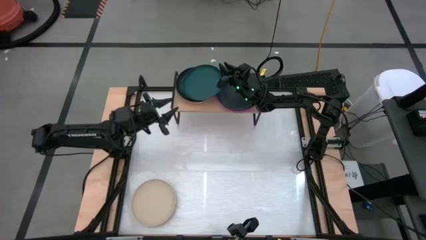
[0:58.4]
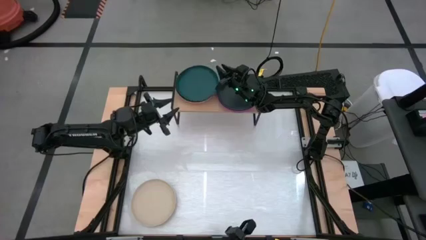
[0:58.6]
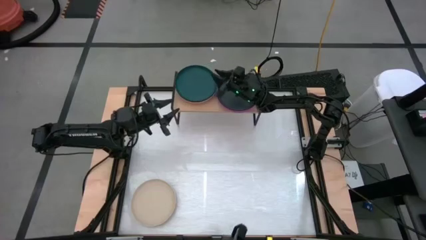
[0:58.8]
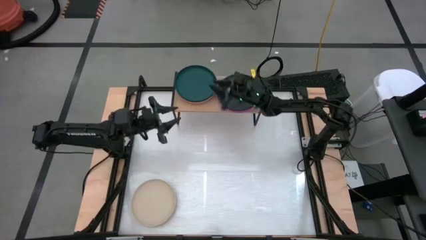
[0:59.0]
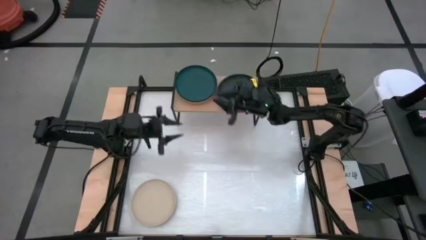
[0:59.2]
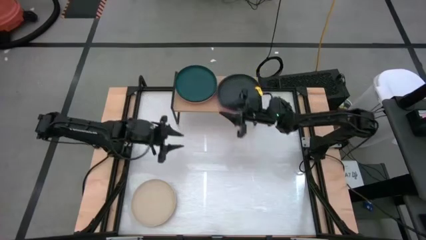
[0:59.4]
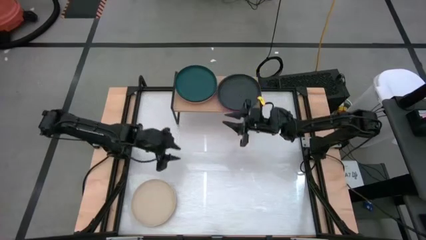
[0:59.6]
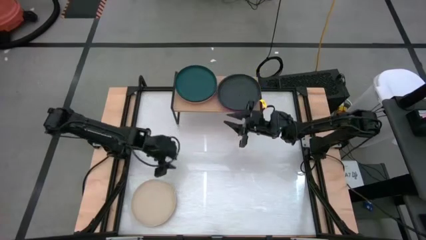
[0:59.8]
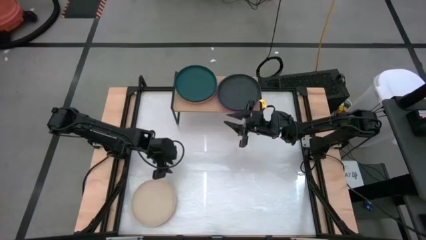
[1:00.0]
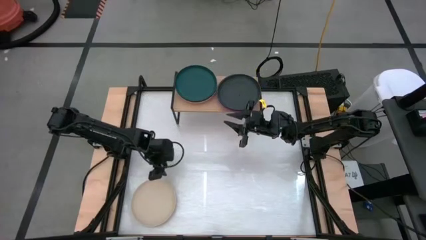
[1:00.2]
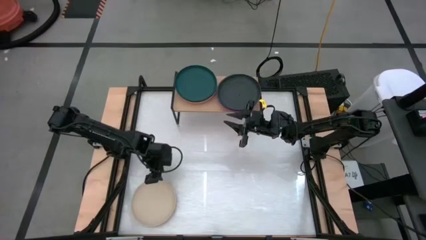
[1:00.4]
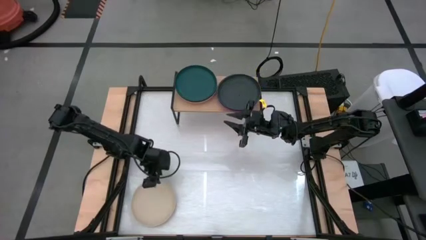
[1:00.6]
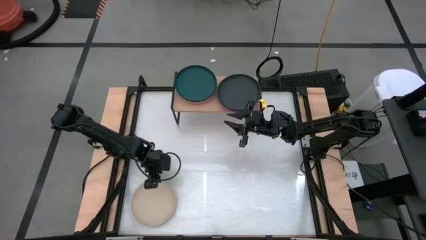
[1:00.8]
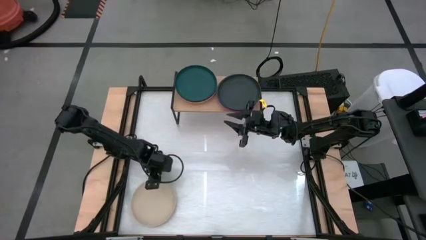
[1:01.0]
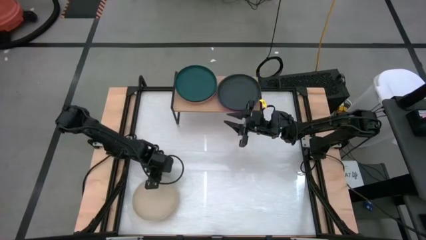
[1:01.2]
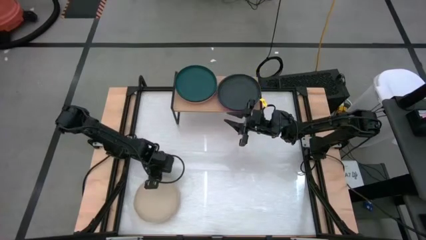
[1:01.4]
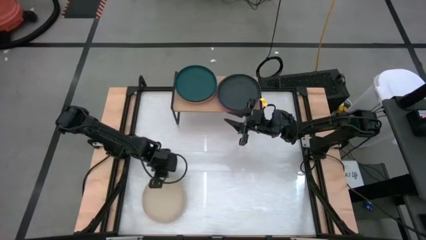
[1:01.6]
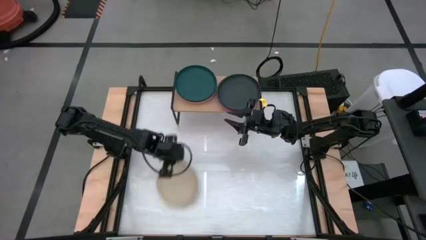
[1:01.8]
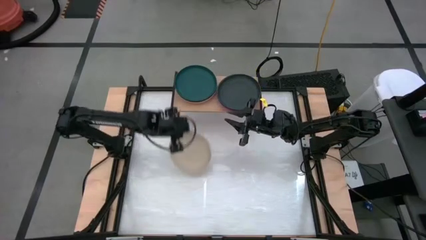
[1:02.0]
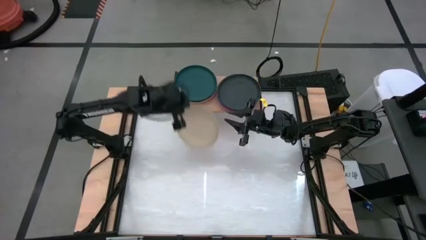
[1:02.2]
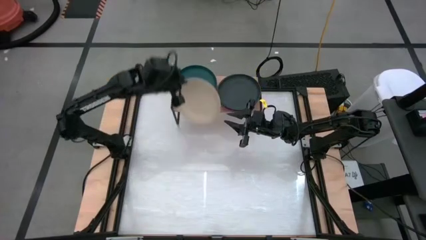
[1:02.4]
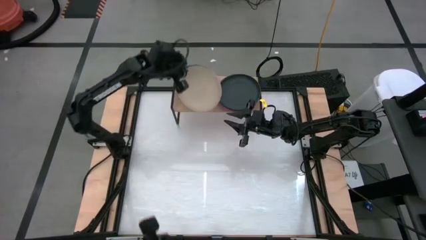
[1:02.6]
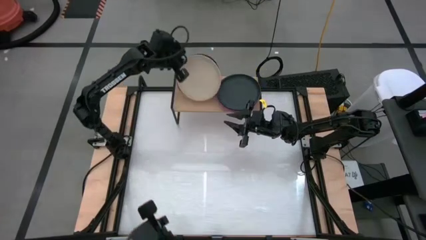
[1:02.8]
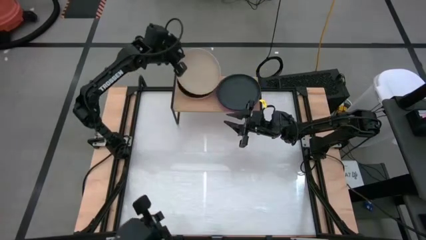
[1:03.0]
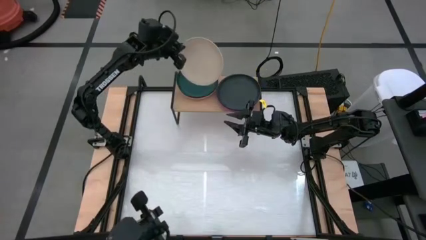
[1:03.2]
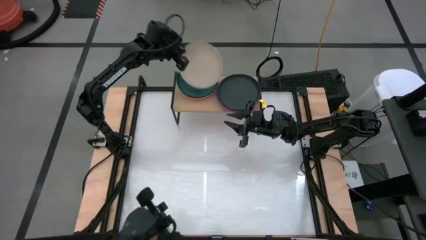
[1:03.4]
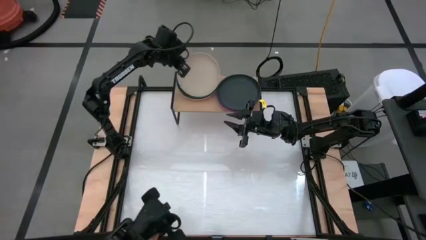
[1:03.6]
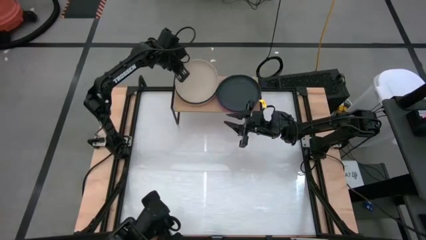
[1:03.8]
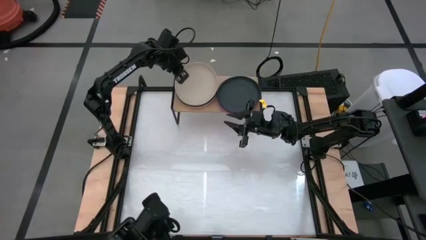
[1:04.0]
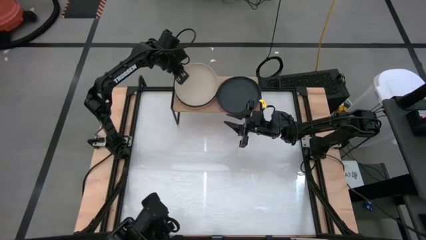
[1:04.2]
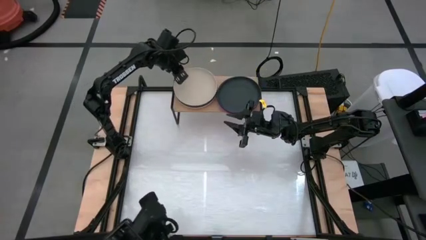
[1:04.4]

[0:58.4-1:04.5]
Task: Place and stack plates onto a shelf
Stack the white plate on top of the dark green plate on the shelf

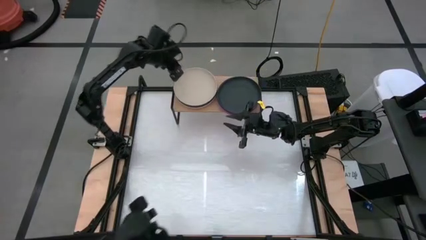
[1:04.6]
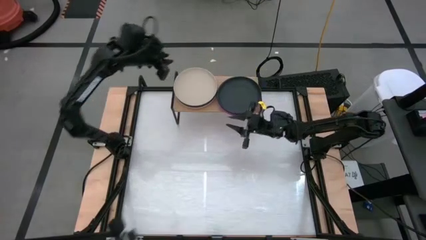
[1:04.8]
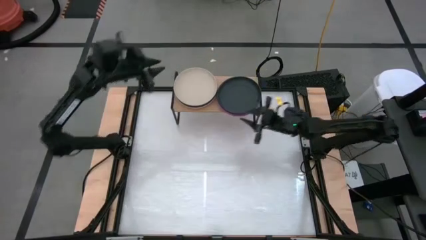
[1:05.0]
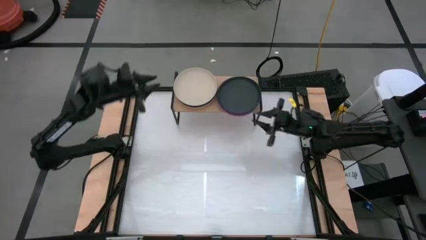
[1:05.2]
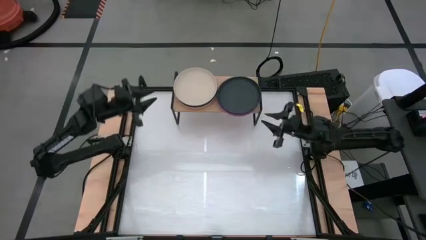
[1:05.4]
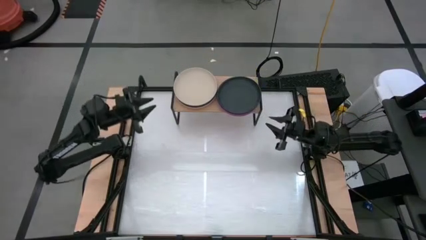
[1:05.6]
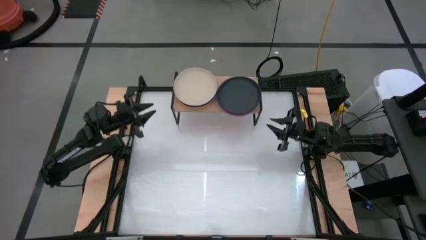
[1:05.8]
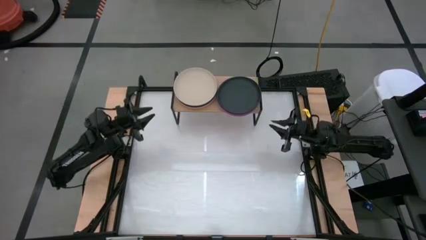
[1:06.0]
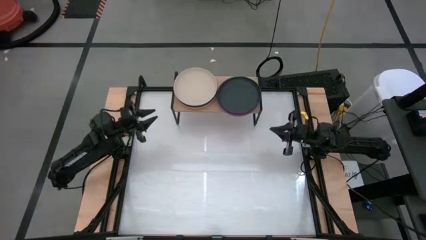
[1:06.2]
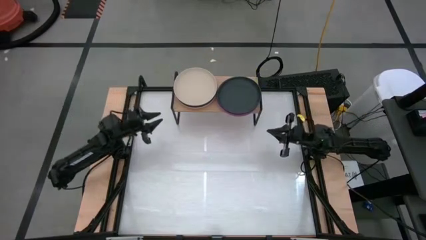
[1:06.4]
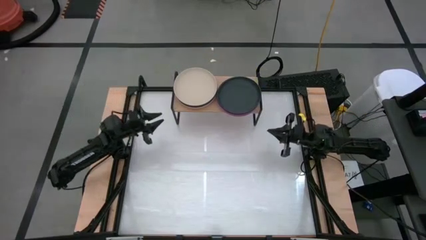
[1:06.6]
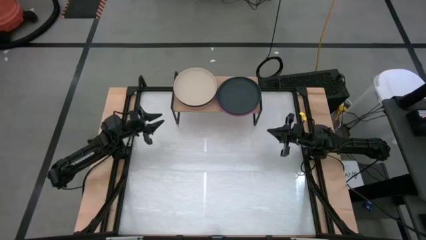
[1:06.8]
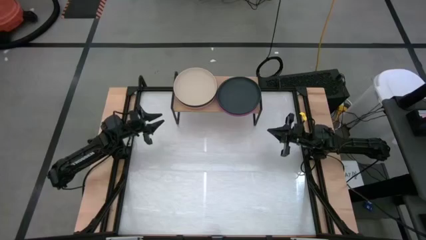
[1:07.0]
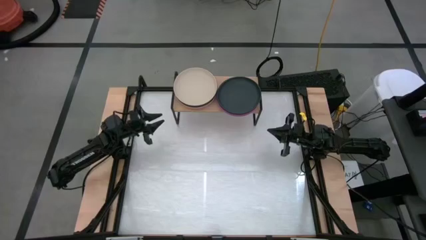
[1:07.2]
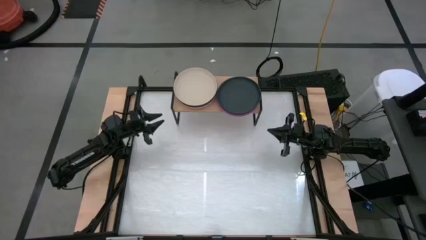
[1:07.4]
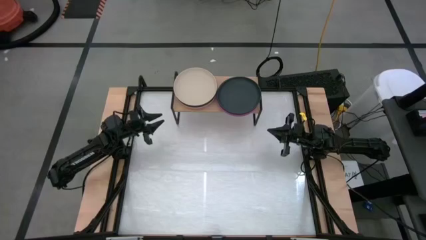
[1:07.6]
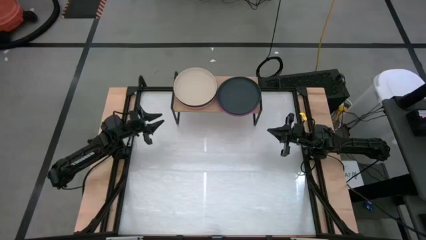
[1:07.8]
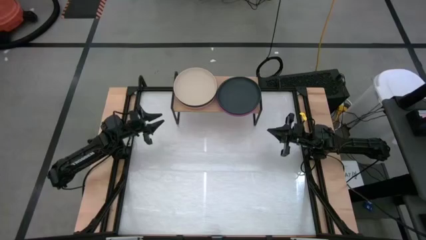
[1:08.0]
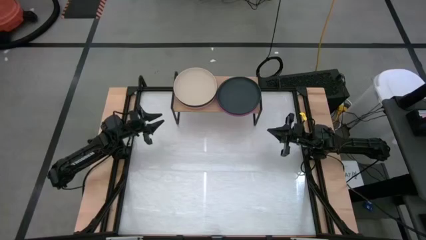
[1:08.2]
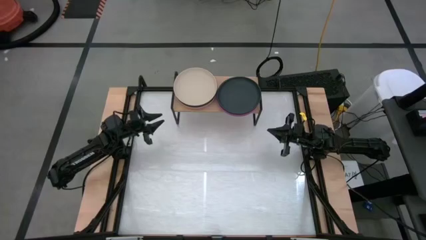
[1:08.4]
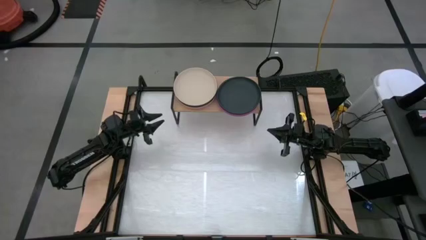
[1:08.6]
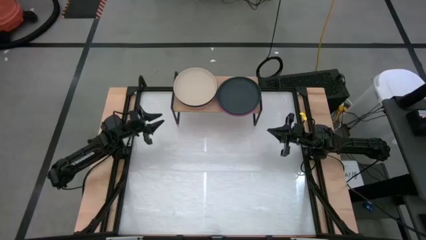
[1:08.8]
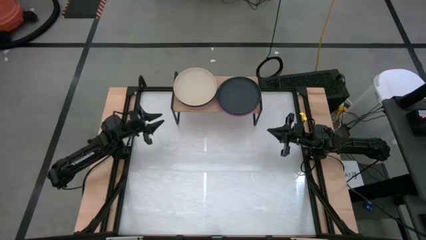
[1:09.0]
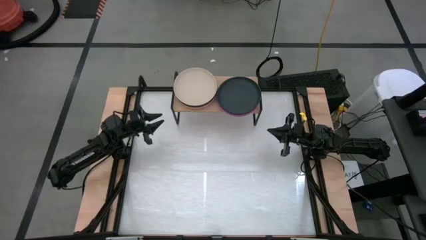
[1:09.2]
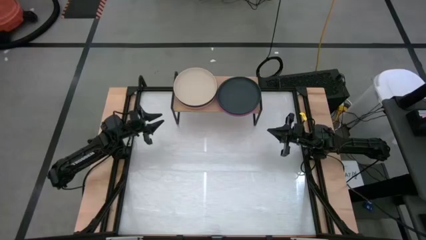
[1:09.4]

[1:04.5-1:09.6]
Return to Home Position

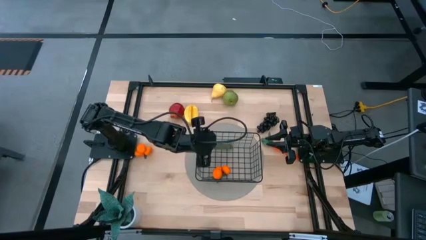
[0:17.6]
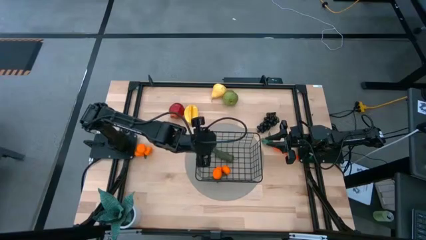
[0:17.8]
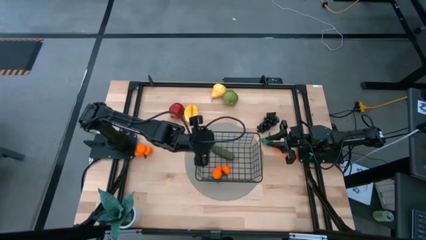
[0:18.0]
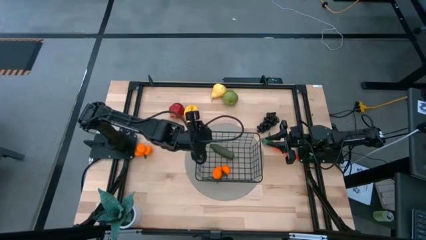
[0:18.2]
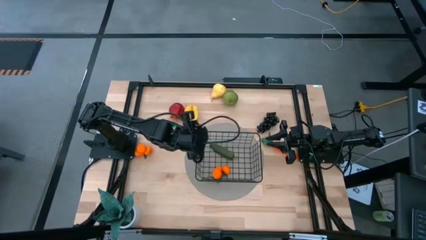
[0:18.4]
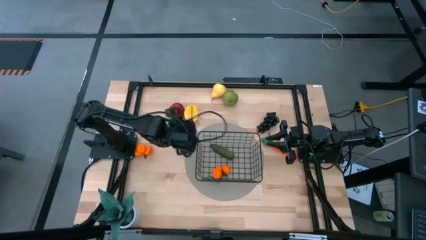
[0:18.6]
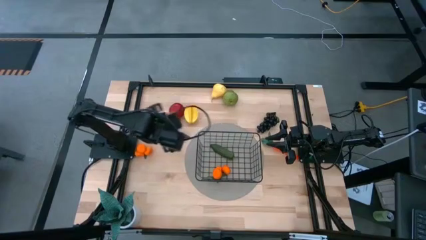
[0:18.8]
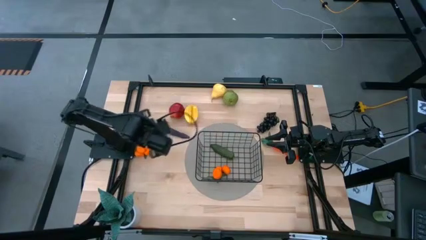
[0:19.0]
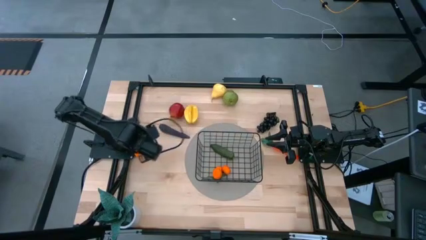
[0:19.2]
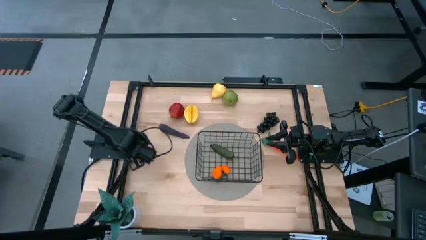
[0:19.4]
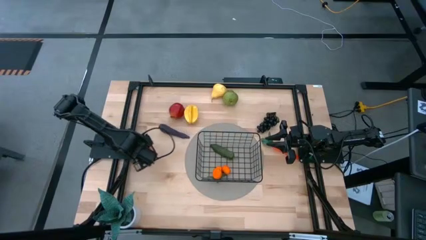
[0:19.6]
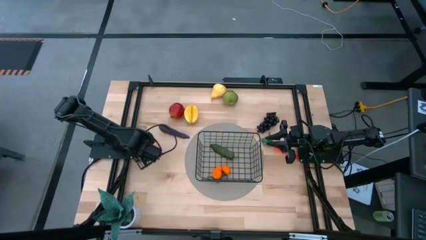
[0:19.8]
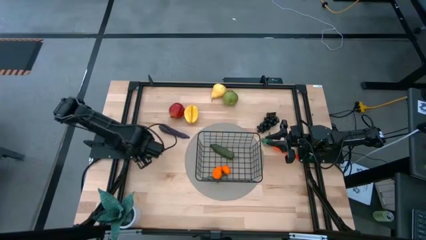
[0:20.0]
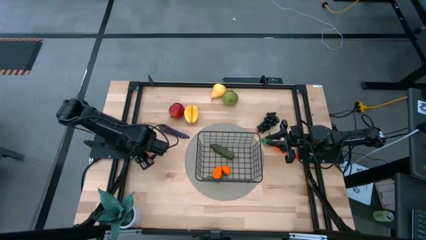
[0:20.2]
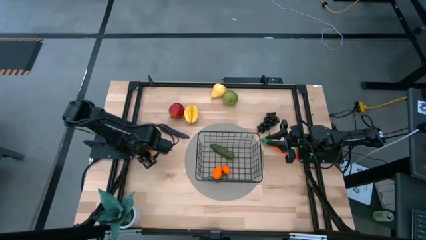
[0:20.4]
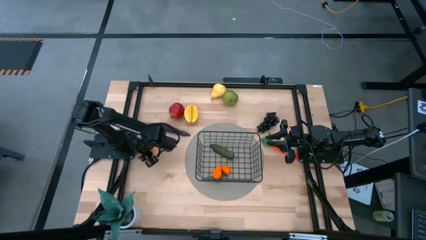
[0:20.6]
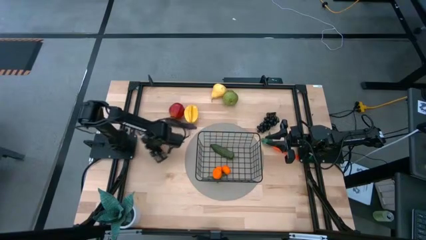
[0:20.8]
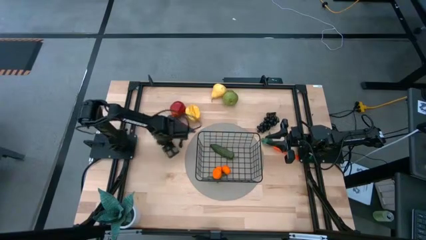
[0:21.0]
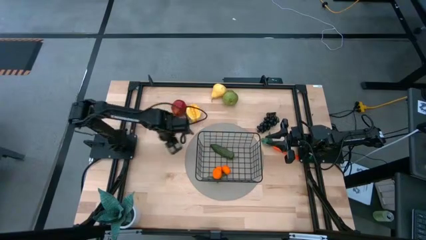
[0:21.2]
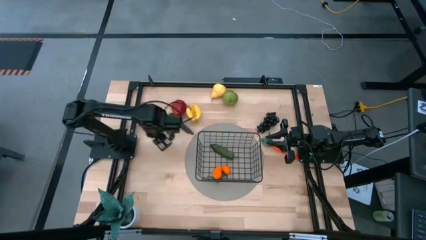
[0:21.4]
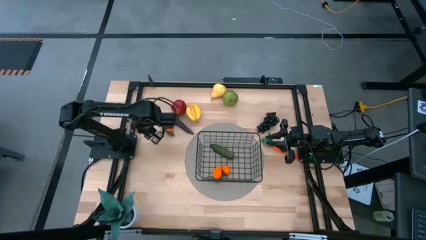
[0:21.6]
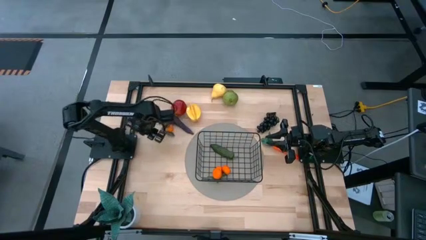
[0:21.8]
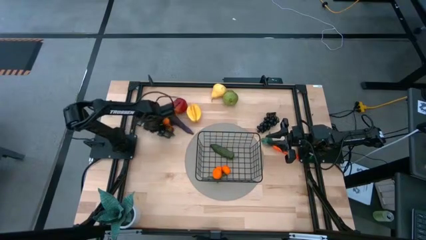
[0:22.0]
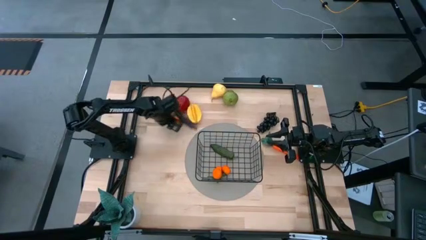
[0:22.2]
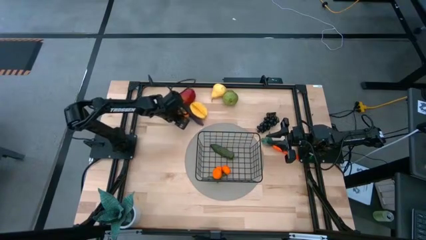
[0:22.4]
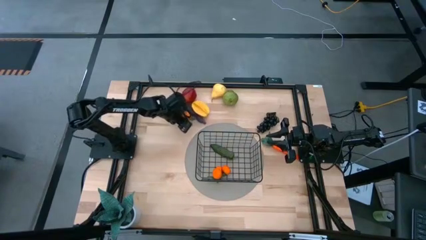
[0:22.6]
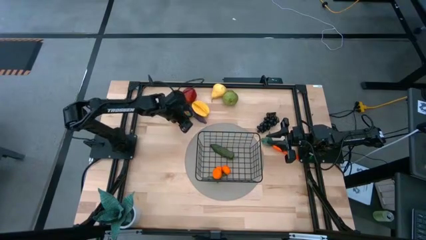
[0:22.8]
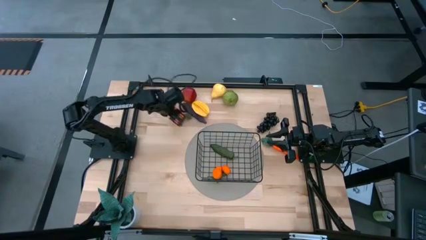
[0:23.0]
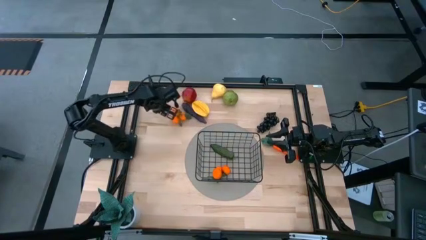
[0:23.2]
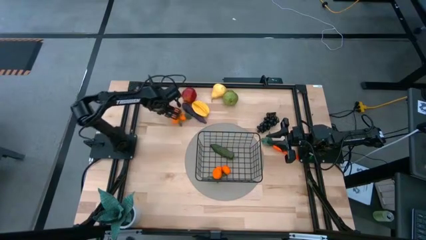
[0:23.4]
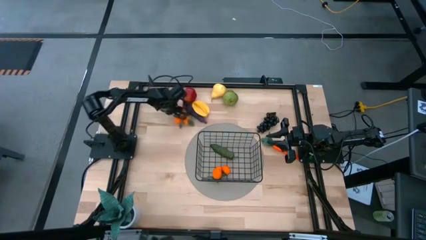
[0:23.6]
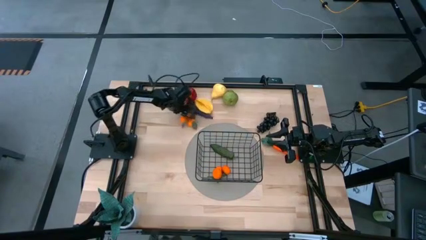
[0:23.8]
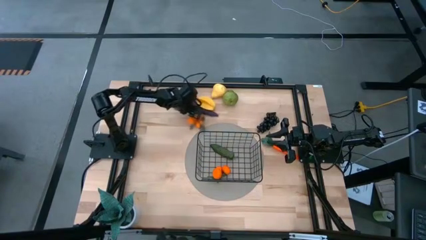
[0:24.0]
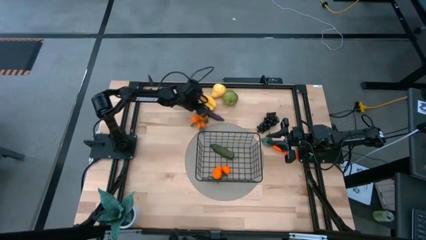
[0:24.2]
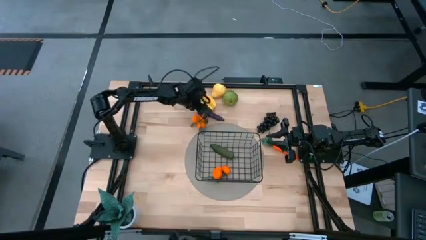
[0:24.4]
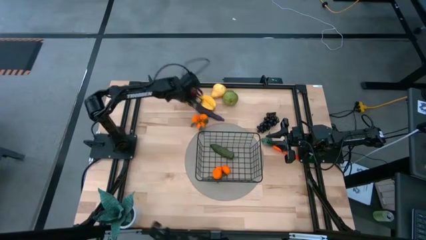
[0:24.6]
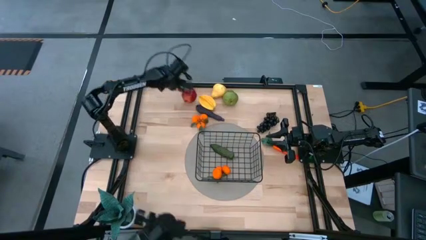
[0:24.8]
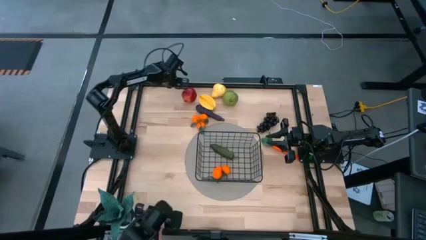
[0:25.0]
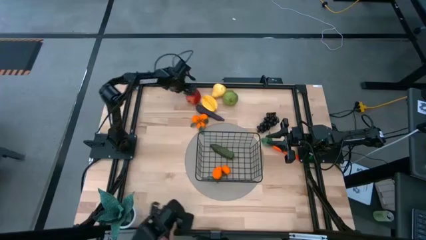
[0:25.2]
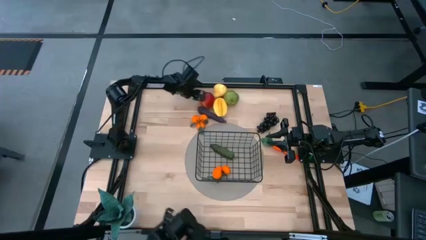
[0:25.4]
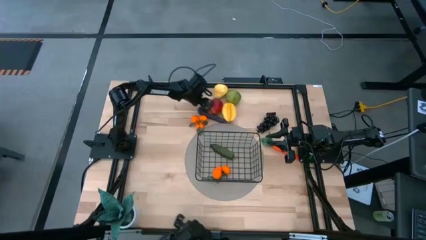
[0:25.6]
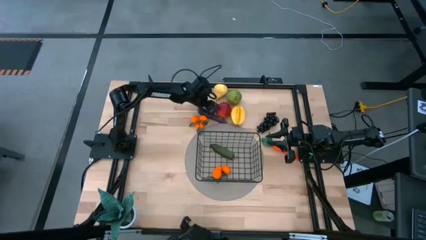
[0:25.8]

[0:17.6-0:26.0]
Task: Build produce basket
Move the fruits and vegetables to the top center of the table
